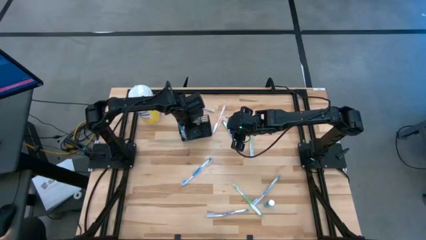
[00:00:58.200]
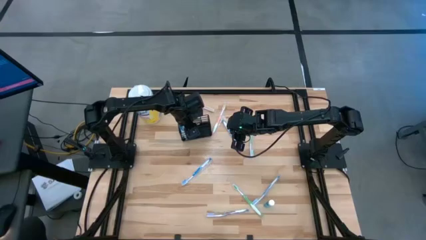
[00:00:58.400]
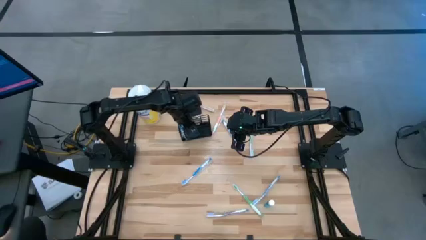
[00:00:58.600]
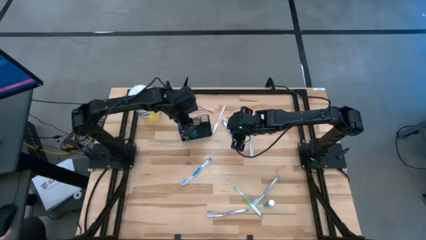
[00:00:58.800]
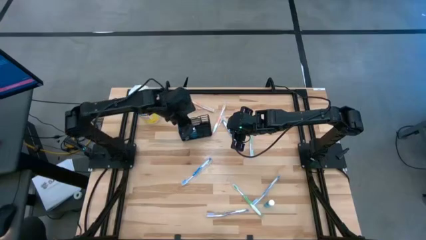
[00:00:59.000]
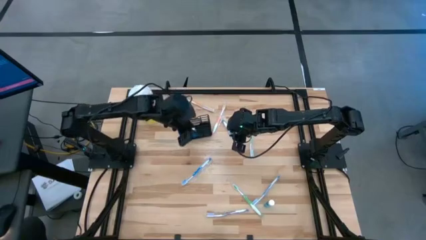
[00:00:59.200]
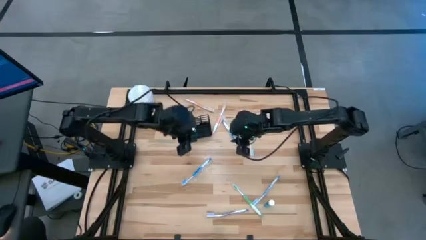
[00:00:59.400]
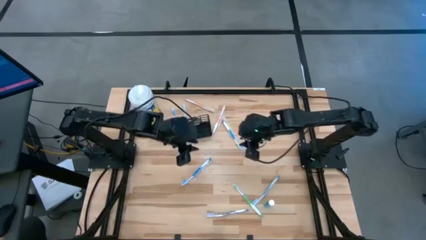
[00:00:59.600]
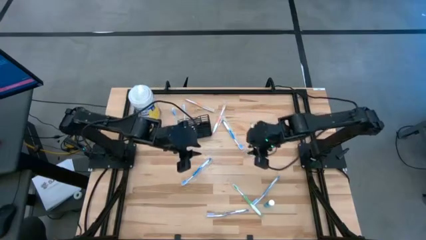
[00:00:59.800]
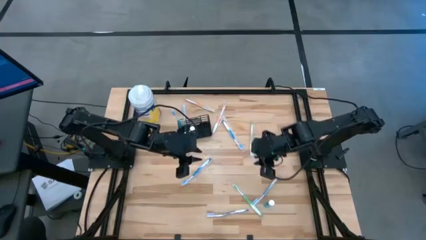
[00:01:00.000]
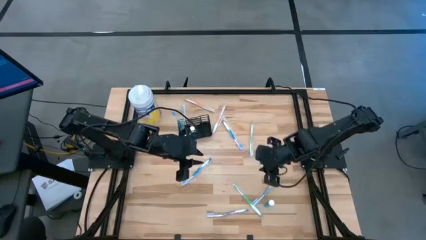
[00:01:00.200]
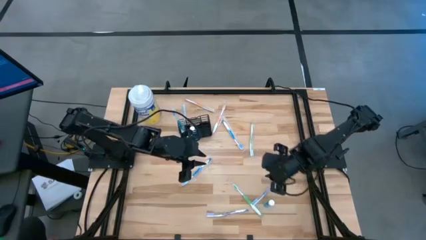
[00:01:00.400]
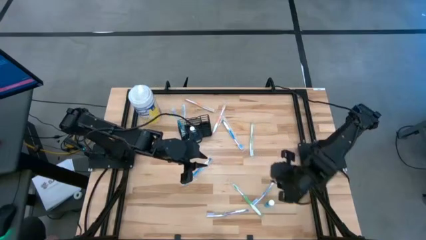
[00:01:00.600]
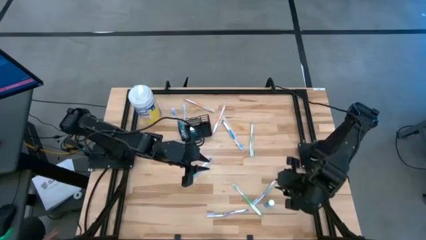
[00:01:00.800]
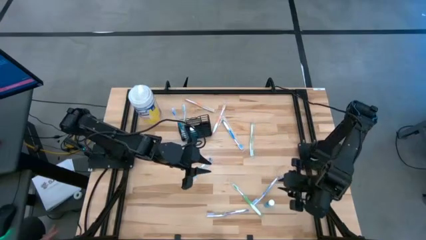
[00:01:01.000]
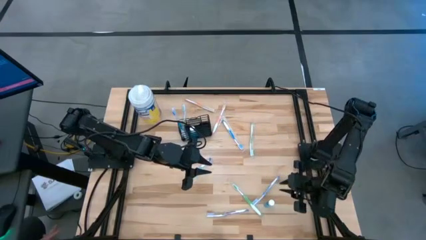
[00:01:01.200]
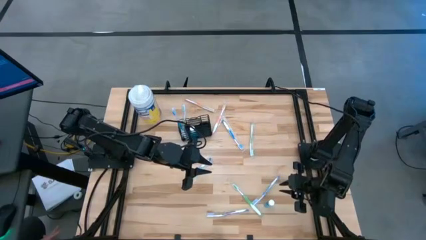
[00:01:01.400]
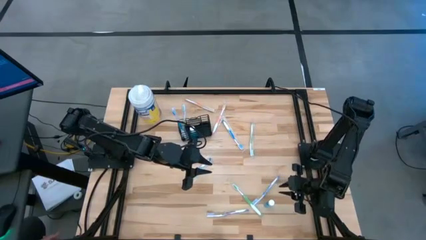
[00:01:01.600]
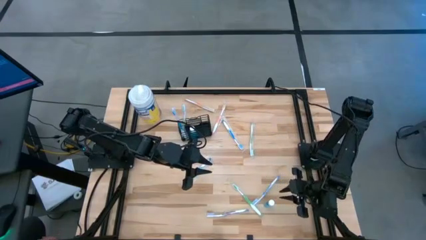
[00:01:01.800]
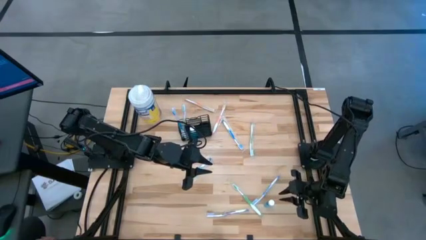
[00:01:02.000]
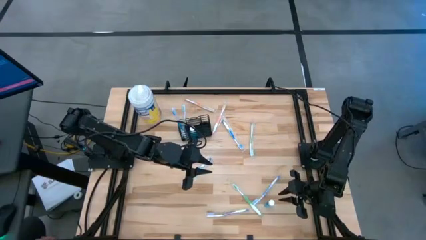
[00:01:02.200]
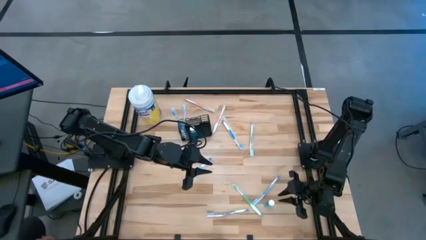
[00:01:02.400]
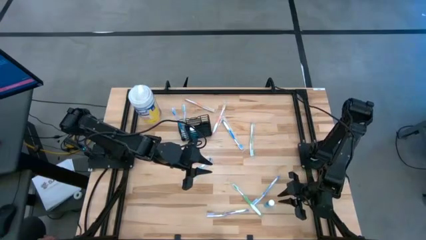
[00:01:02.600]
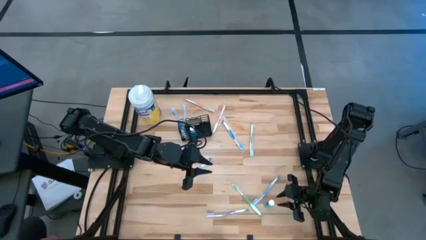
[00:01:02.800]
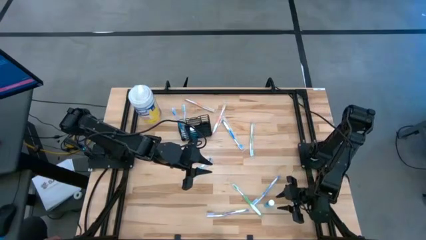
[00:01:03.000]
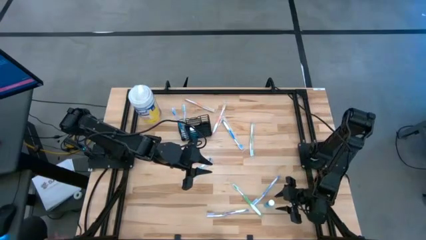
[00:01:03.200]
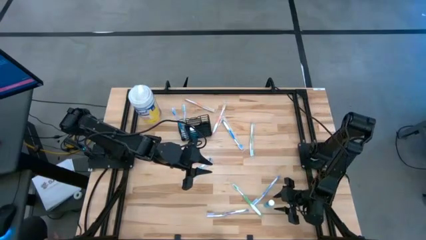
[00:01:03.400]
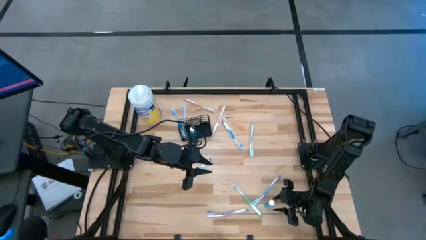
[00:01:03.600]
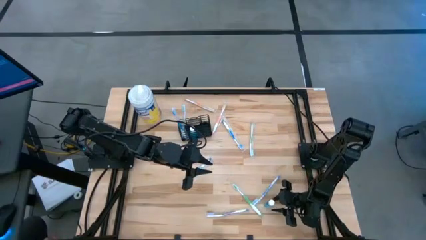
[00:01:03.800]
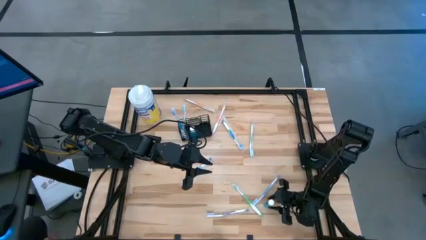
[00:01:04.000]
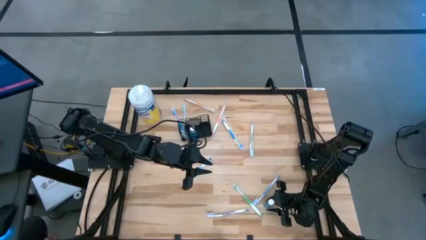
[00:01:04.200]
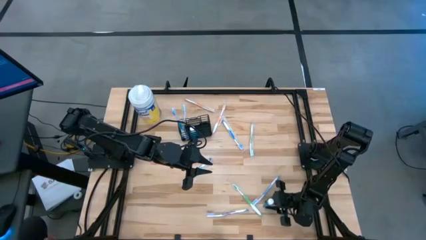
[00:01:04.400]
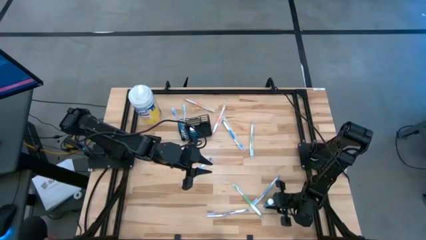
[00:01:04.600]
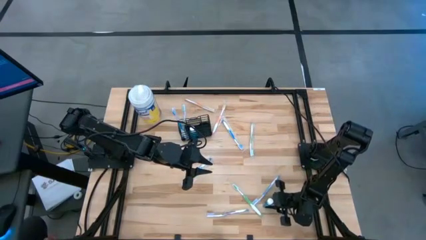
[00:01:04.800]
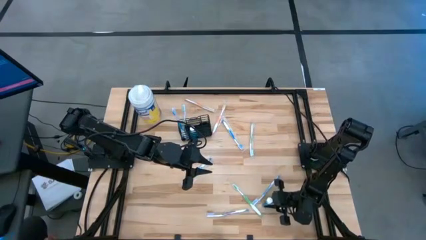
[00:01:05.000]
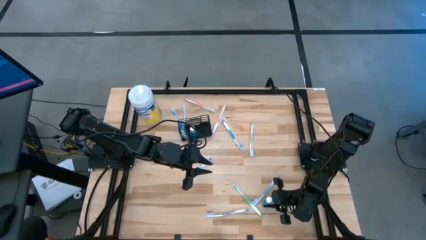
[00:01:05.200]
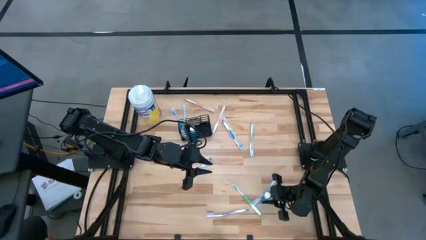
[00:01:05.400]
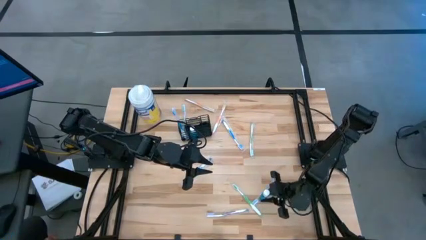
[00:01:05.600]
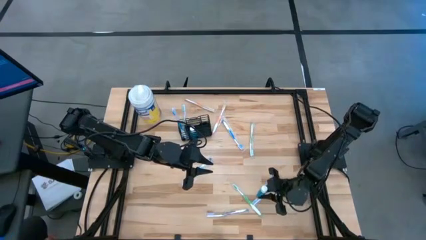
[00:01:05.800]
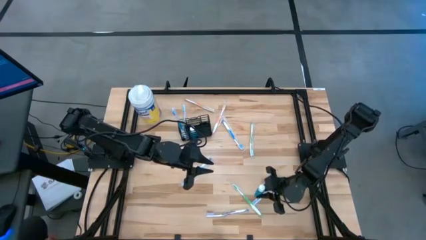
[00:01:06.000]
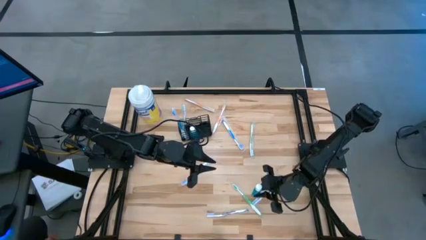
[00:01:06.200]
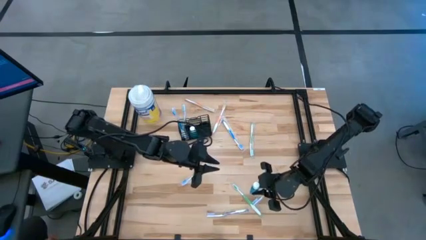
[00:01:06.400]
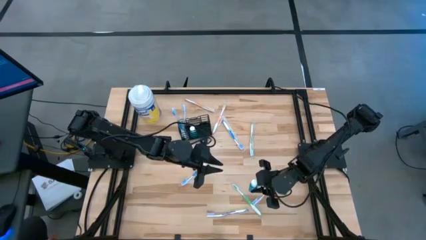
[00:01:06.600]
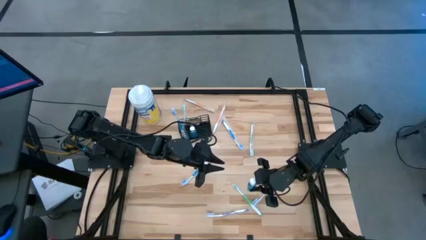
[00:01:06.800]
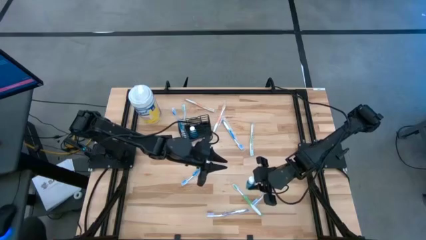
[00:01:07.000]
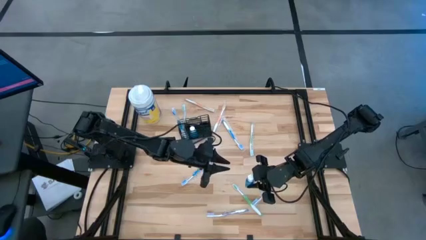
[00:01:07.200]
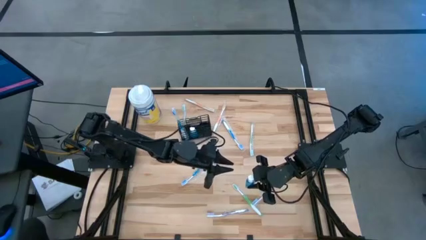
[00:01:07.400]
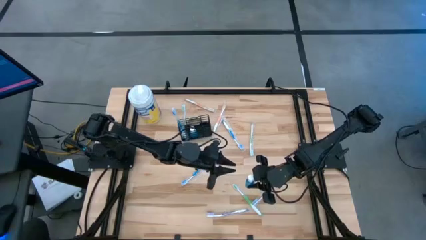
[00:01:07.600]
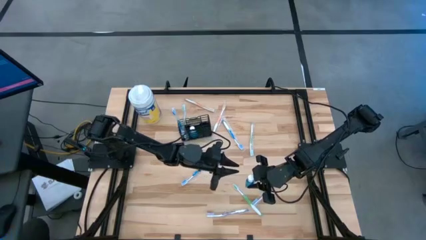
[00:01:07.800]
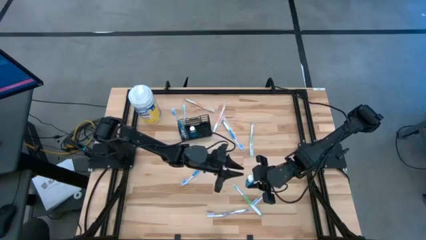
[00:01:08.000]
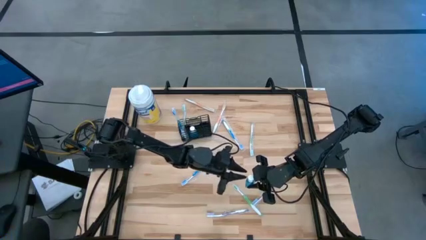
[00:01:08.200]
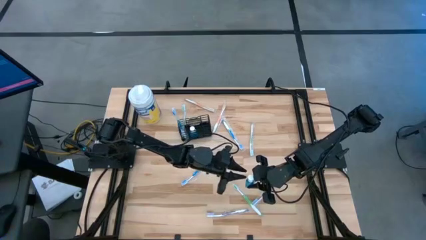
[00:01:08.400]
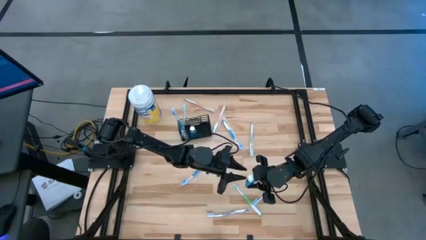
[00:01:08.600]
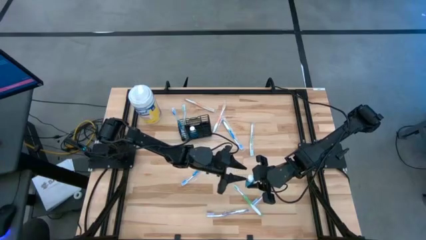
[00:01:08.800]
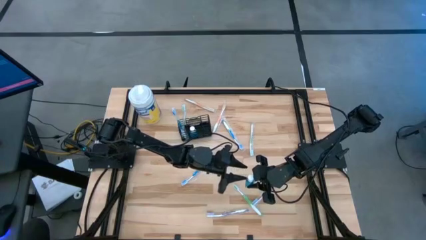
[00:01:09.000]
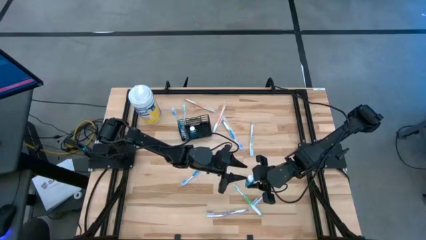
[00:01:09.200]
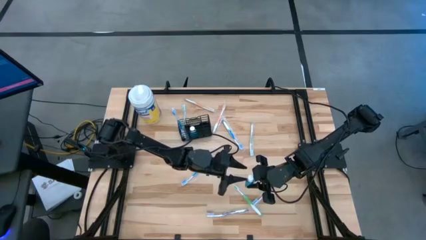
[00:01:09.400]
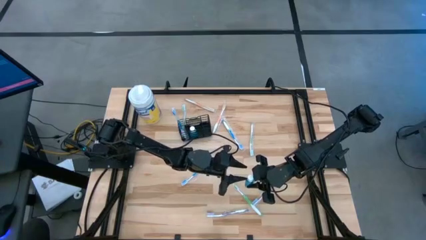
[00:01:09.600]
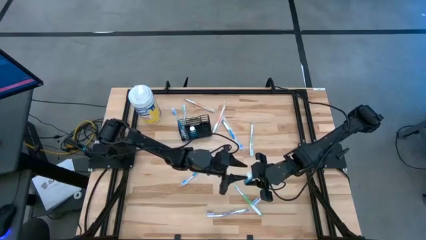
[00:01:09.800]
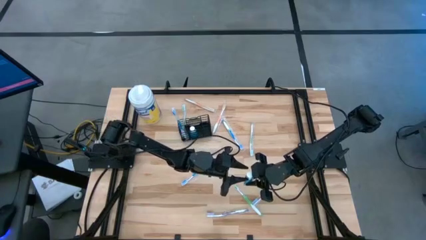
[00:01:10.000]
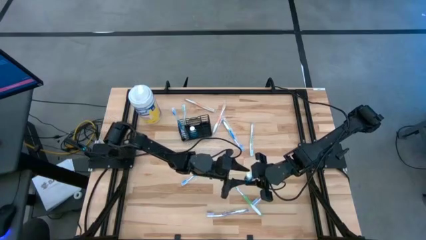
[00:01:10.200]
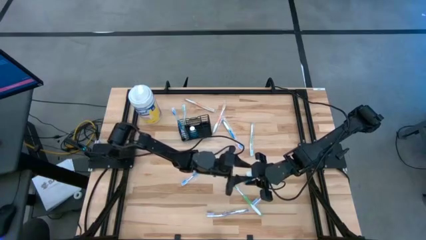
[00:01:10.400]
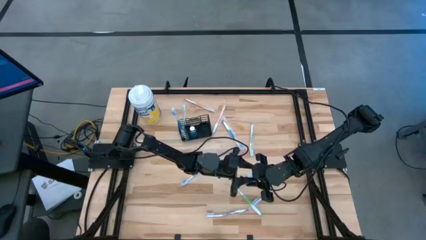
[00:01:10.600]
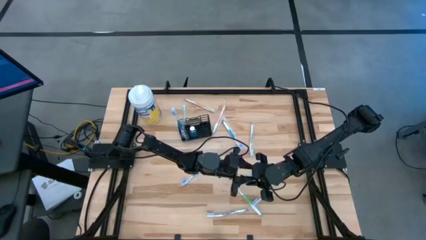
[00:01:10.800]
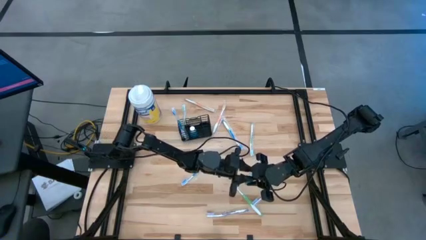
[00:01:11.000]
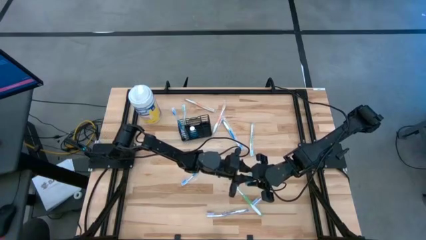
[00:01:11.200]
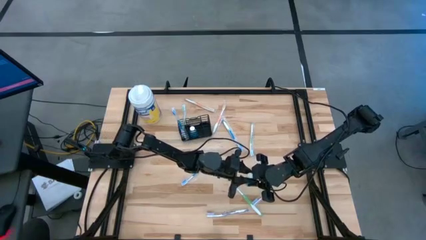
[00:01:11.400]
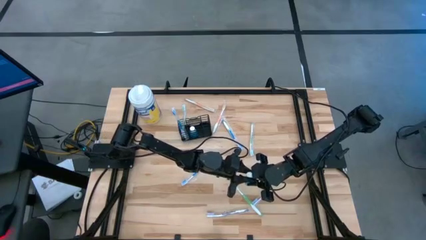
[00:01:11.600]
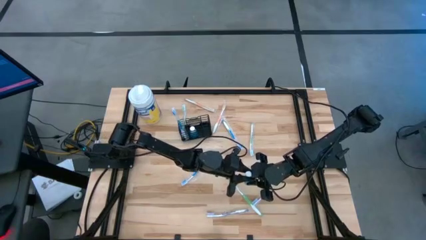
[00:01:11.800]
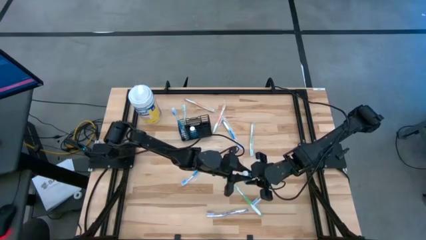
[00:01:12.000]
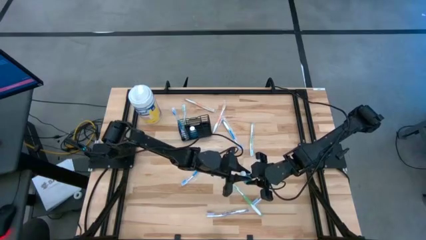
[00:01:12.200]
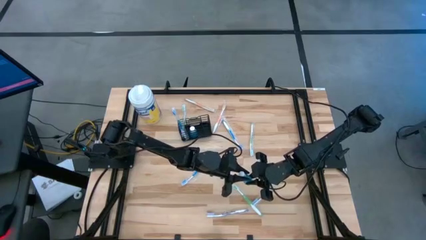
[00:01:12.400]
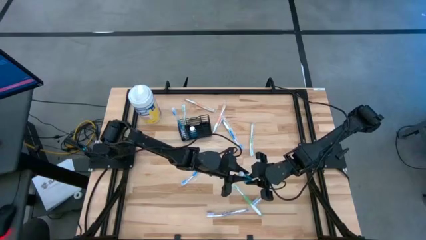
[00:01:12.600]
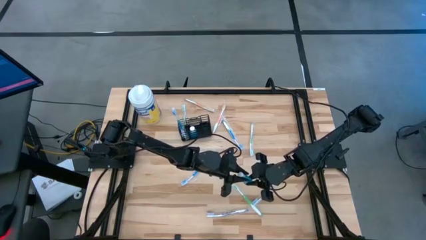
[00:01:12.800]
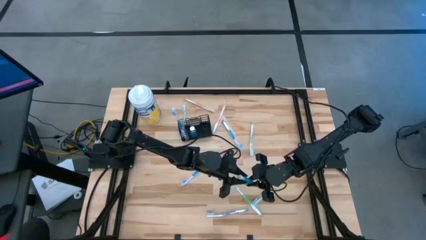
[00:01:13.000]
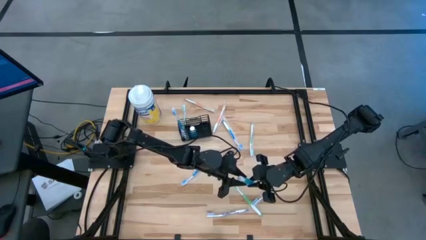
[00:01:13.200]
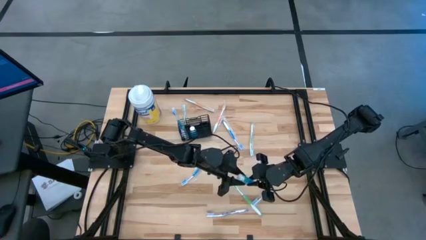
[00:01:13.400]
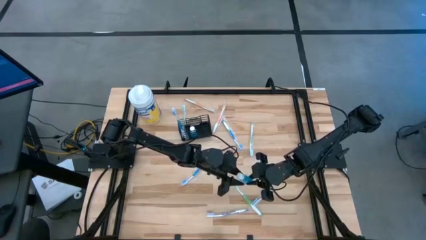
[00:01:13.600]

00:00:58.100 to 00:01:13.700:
Task: Pick & Place toothbrushing station
Put the mouthwash bottle into the mesh organizer
